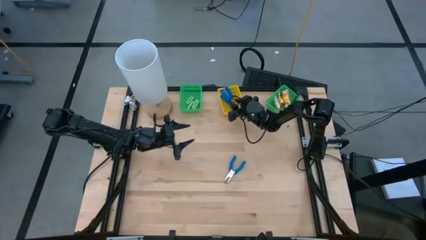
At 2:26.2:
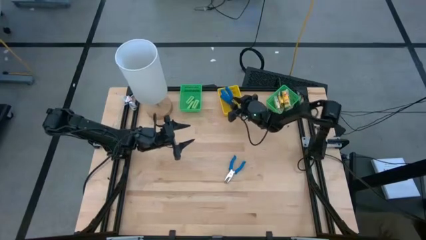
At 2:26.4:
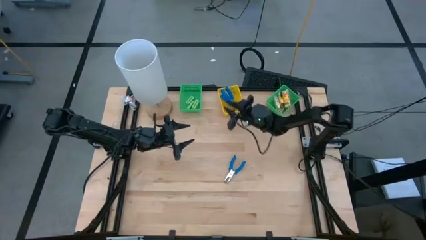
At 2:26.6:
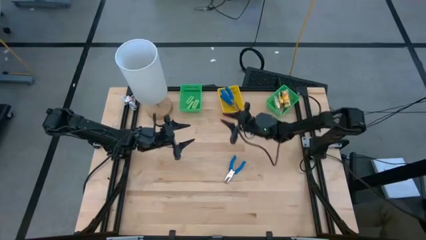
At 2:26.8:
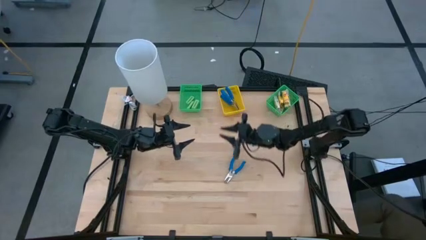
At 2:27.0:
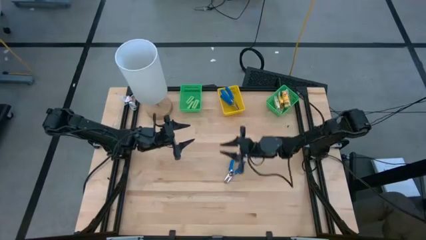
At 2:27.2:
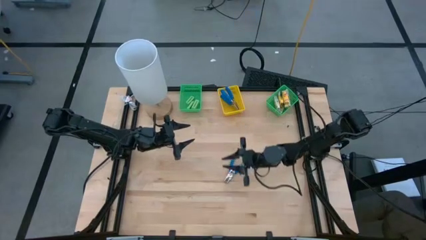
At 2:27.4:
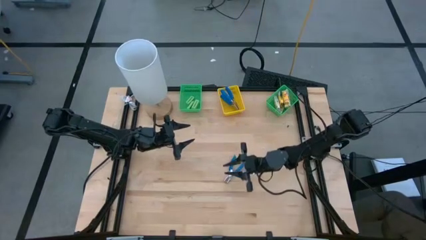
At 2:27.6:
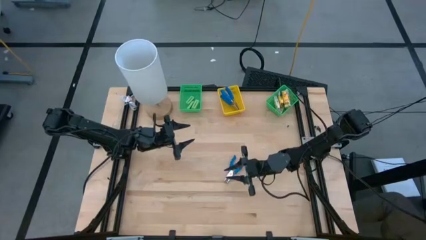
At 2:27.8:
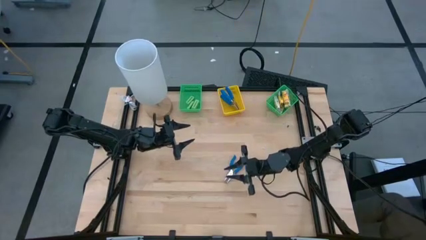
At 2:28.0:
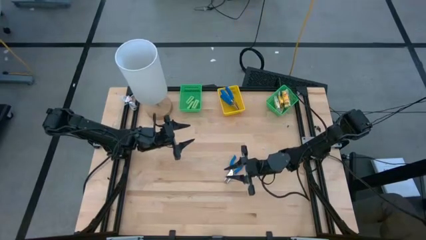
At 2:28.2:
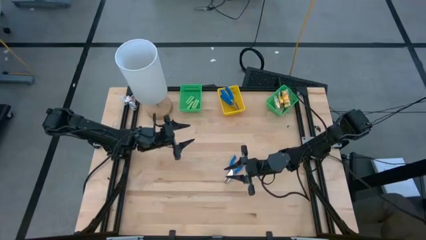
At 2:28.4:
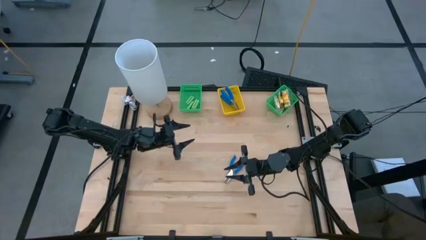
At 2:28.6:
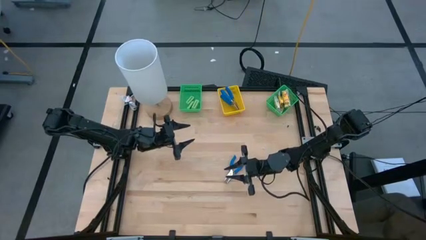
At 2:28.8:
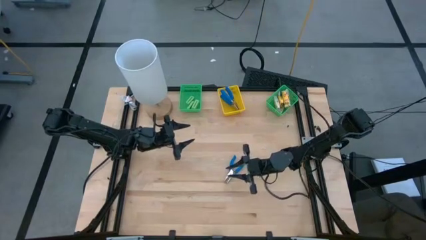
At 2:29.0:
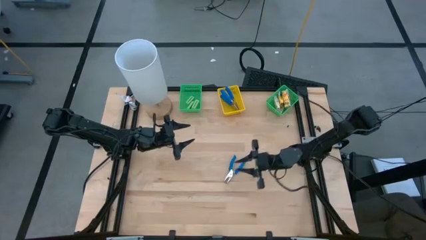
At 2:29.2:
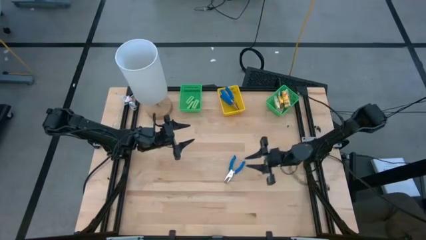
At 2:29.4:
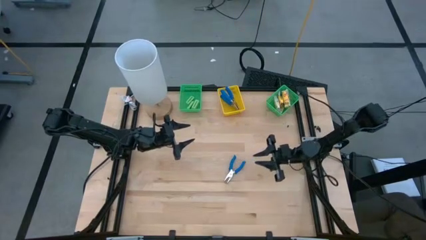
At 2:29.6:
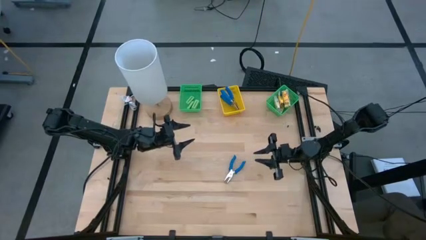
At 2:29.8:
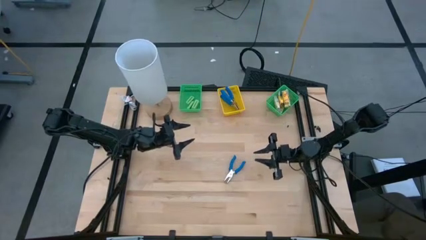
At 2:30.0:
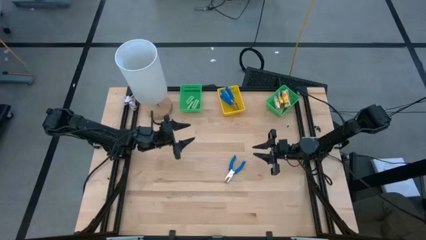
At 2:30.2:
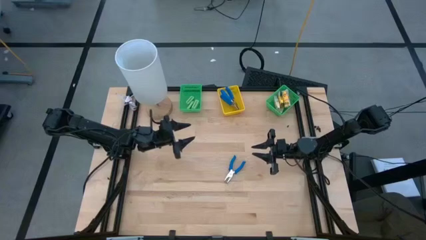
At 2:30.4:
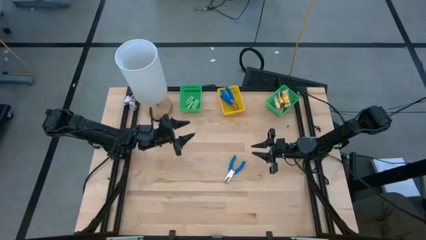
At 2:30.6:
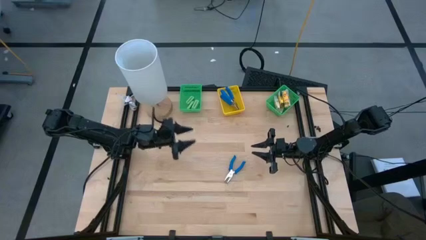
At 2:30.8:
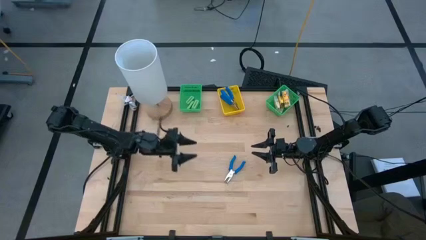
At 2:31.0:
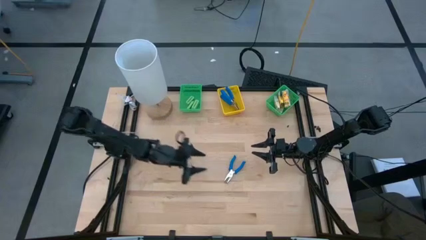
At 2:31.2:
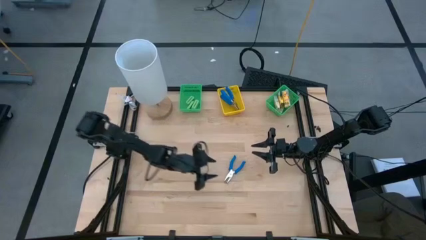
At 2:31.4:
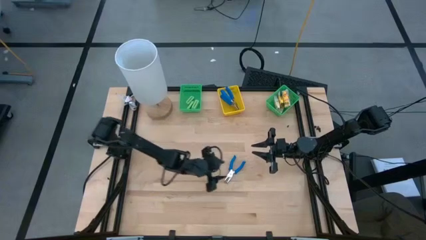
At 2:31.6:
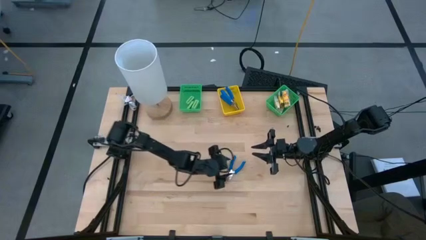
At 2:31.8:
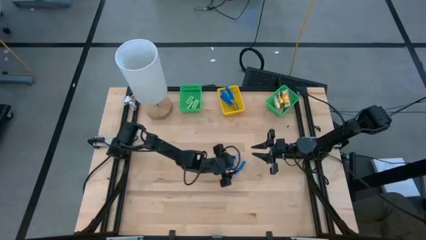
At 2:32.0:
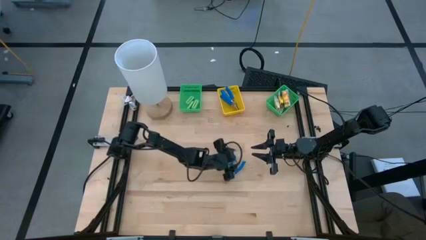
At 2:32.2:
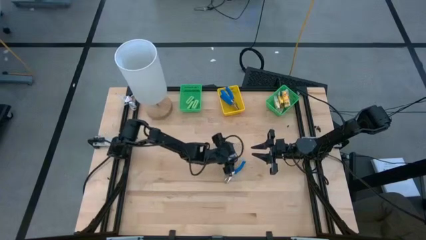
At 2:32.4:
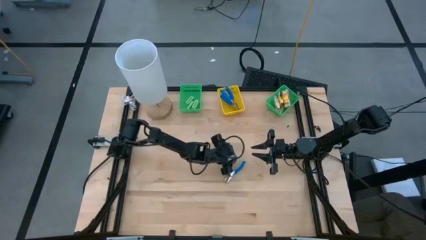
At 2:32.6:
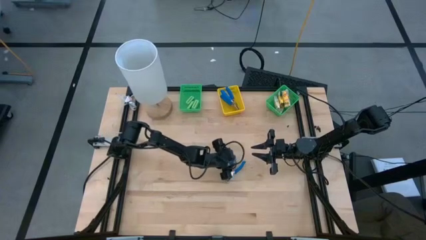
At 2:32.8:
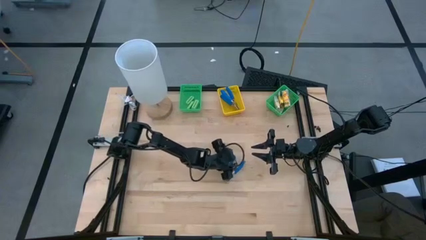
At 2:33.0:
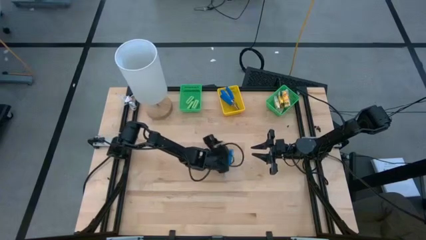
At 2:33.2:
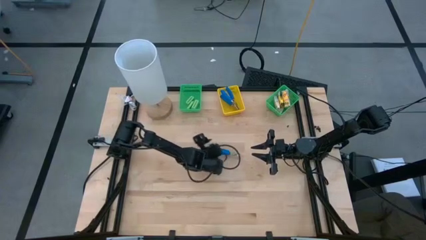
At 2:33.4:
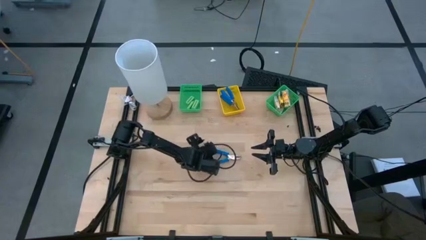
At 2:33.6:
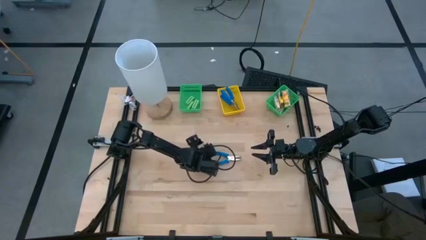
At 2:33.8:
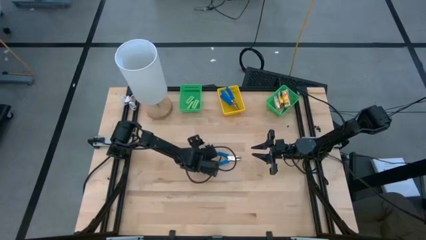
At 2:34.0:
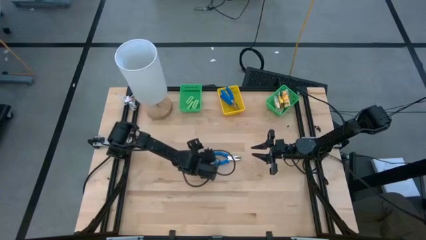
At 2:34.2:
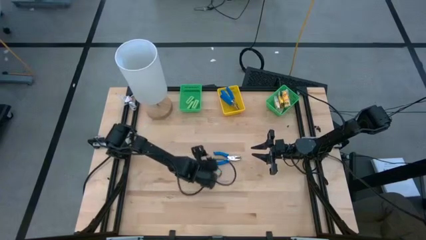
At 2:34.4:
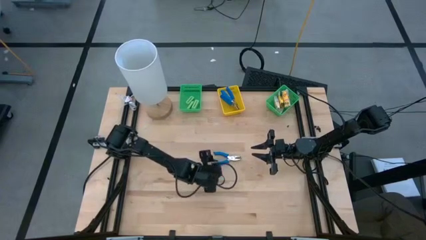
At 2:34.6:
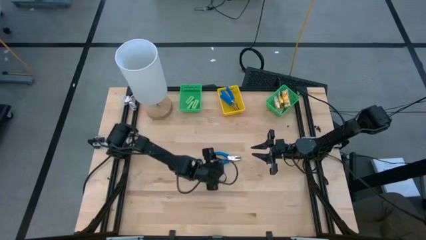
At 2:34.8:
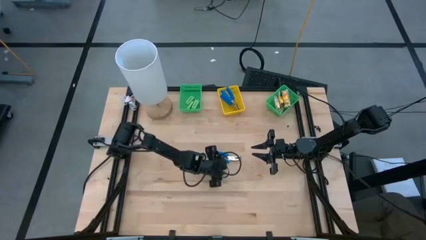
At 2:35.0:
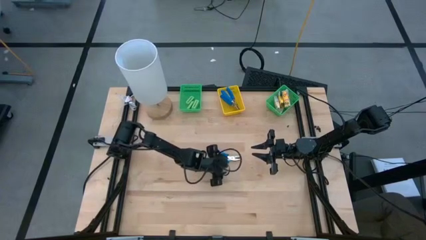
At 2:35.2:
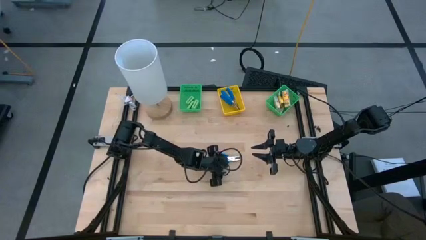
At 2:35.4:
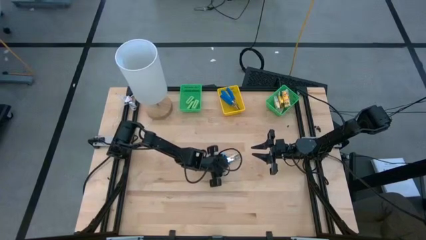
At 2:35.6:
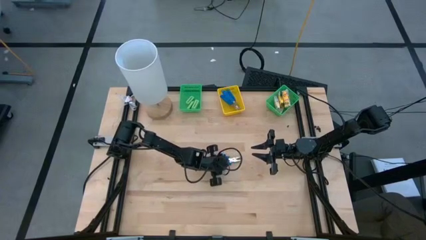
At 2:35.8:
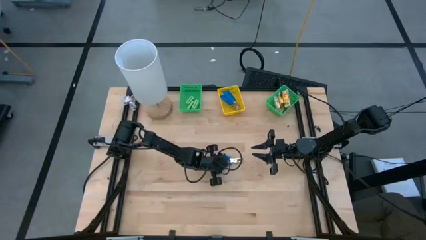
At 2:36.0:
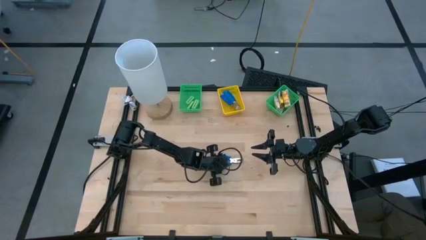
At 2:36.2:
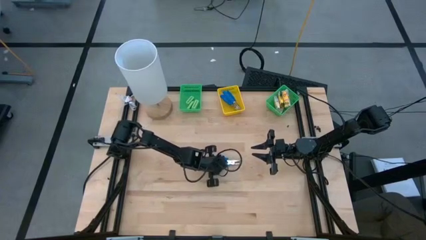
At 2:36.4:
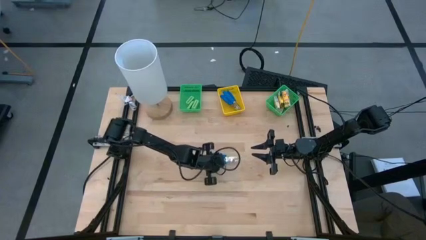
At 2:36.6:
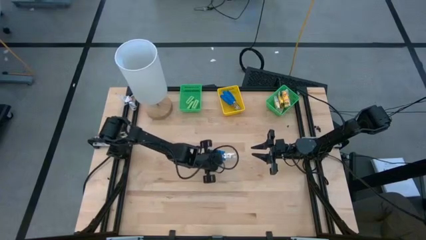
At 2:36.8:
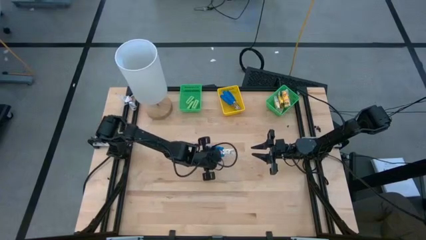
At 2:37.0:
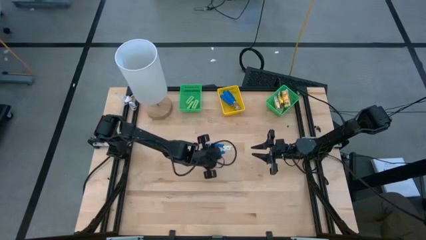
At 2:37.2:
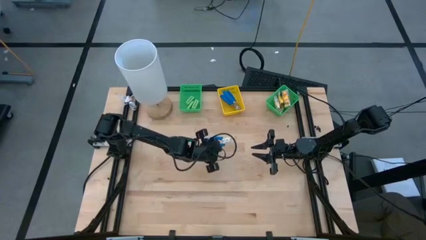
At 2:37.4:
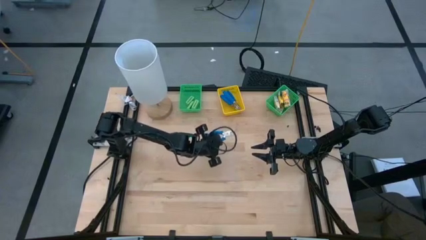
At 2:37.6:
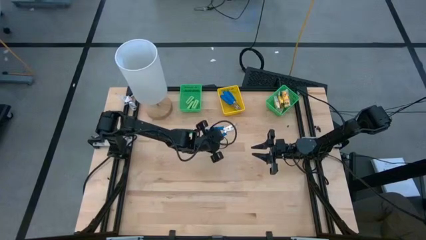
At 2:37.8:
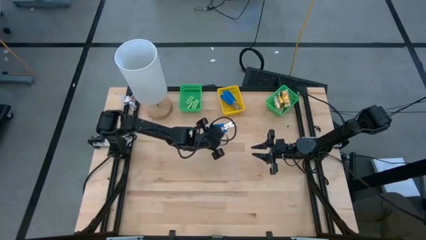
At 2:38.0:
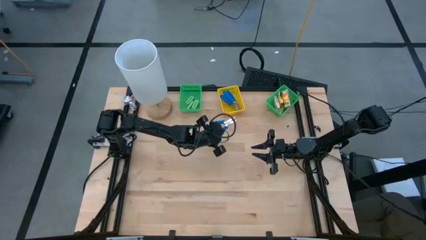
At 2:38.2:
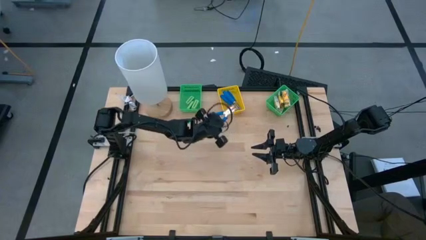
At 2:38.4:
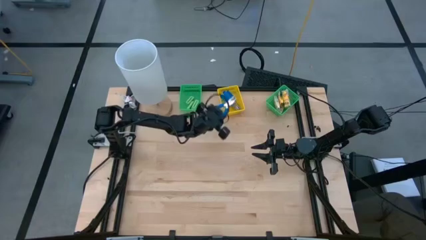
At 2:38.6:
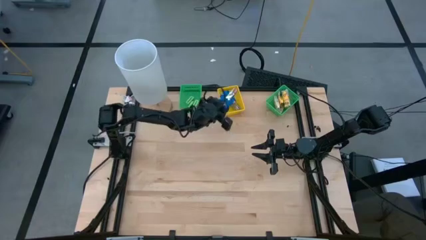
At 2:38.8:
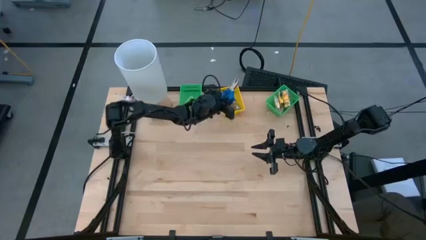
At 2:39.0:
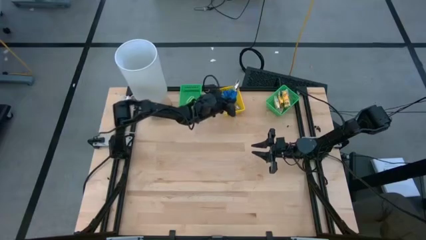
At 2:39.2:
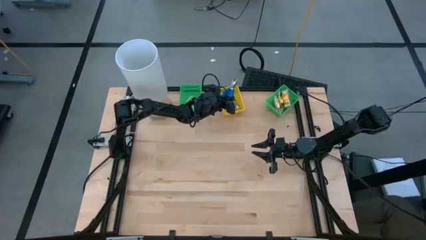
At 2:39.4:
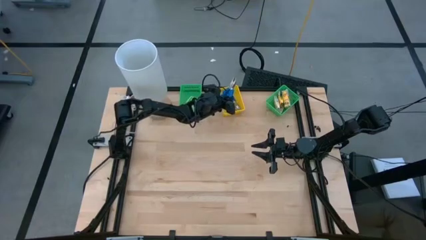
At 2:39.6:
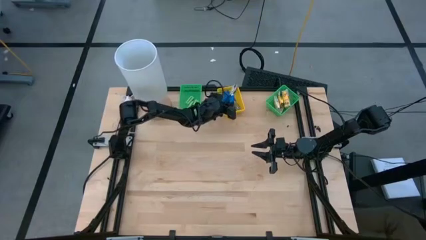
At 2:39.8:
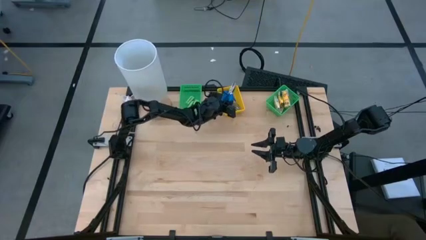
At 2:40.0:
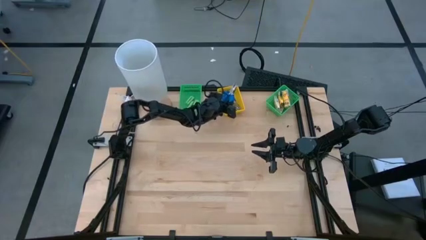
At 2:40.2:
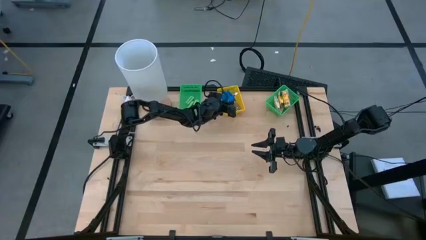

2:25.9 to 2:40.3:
Task: Pick & Place School Supplies
Put the blue puncher into the yellow bin

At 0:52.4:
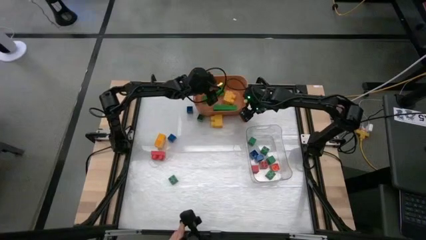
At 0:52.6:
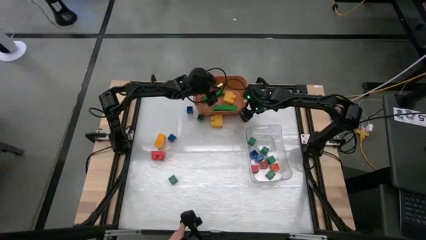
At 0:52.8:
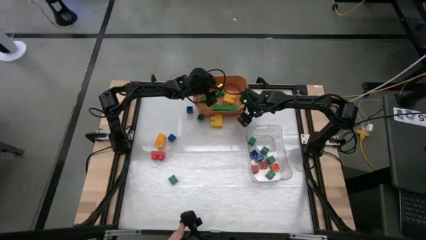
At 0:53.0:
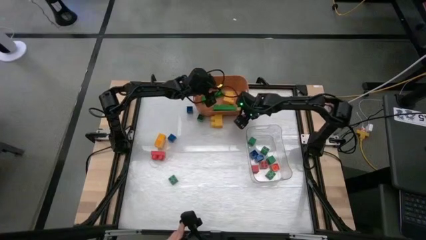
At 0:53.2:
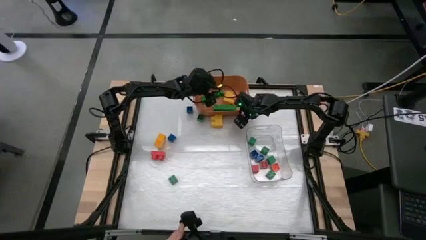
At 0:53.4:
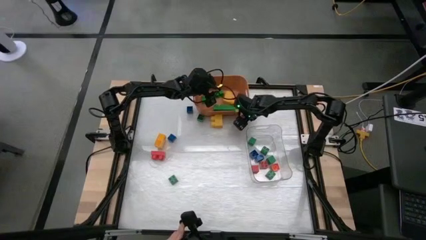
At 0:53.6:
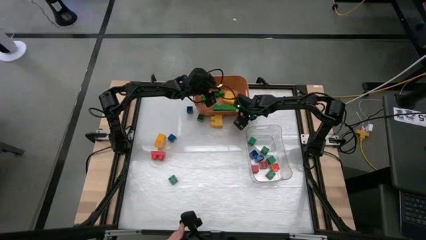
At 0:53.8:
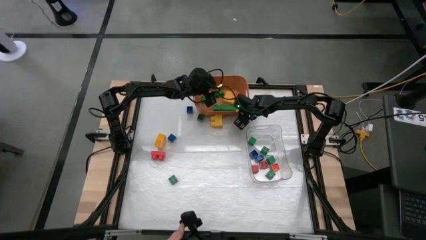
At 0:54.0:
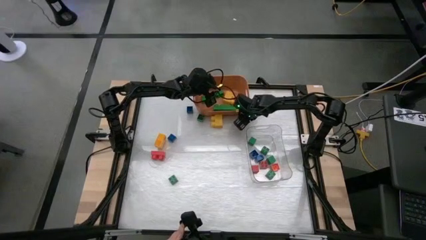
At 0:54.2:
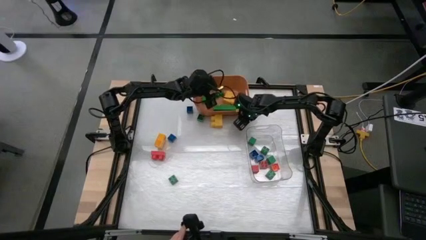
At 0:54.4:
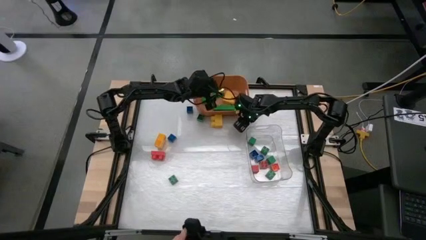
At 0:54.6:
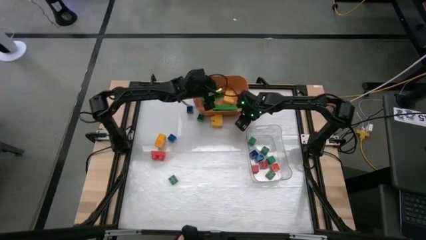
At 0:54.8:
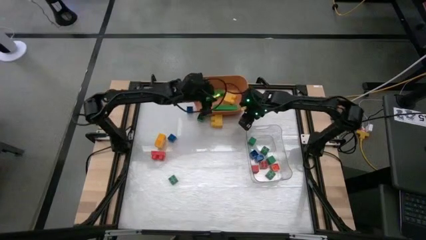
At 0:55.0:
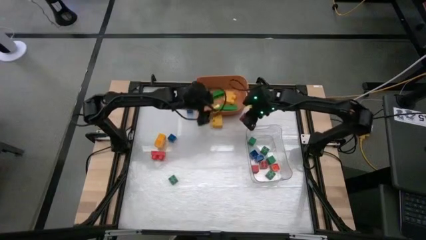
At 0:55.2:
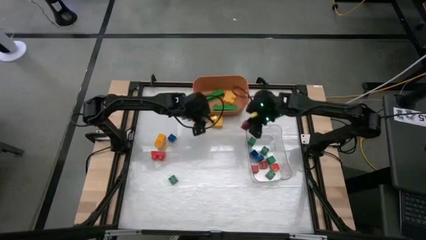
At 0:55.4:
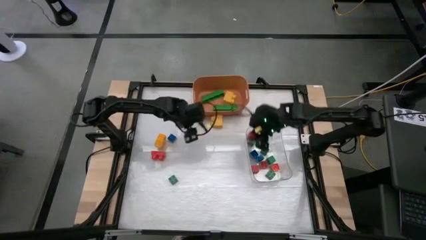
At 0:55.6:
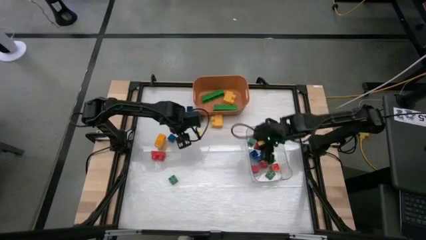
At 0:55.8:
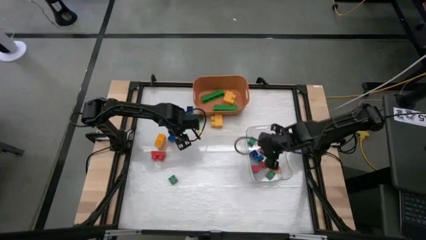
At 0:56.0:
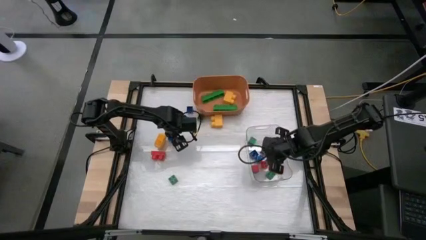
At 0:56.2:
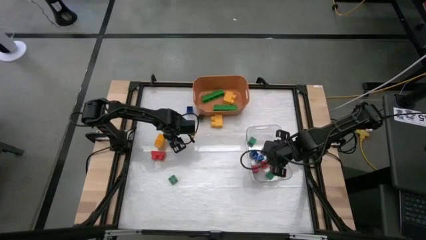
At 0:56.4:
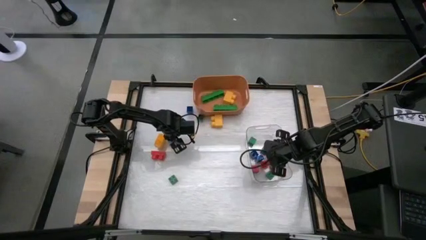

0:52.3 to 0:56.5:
Task: Sort blocks by size
Put the small red block into the transparent bin
